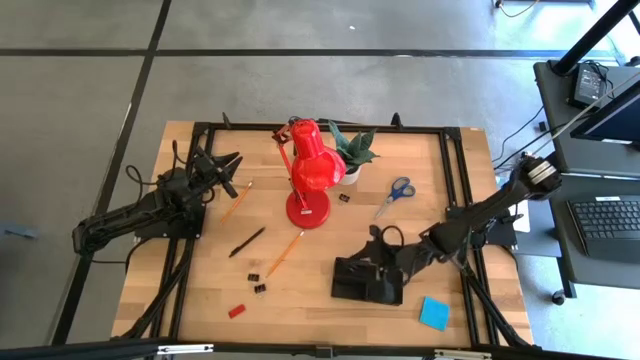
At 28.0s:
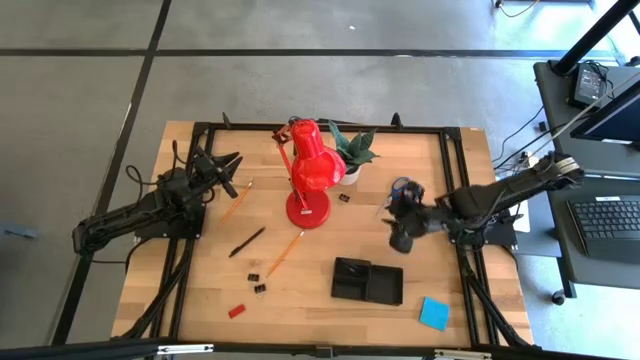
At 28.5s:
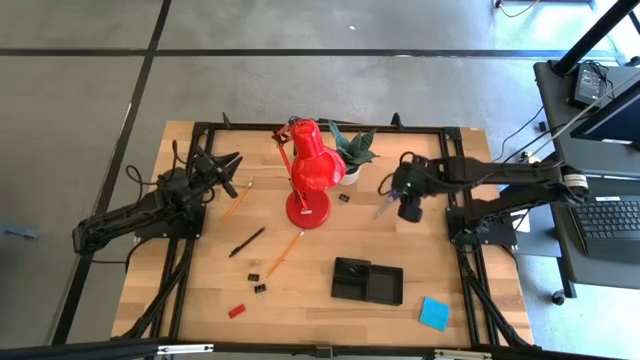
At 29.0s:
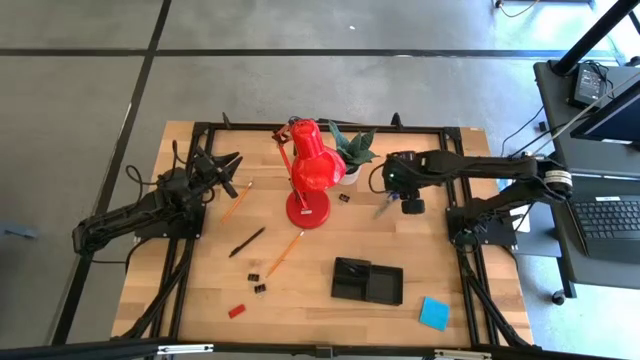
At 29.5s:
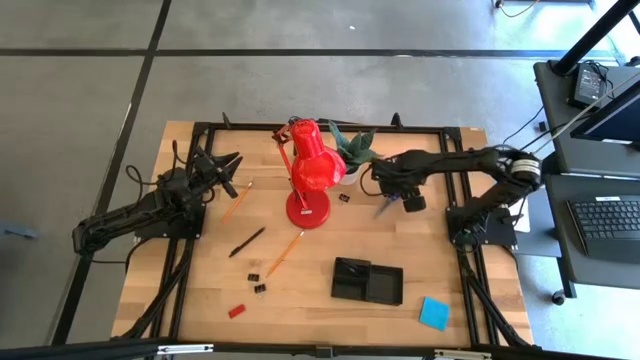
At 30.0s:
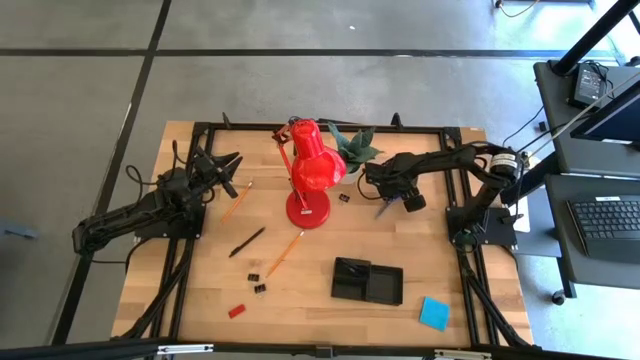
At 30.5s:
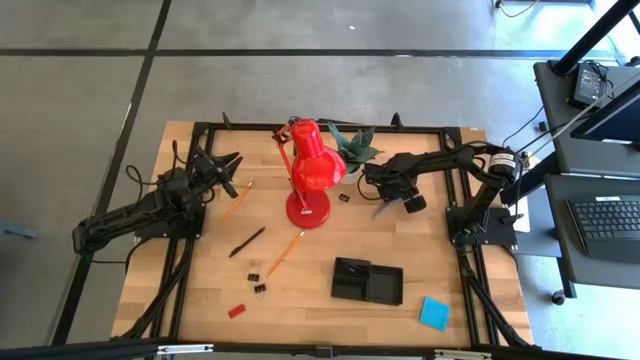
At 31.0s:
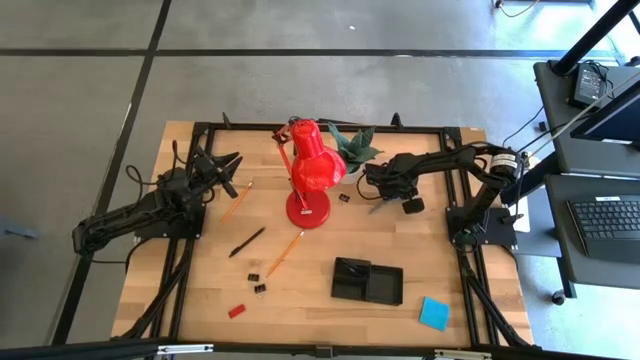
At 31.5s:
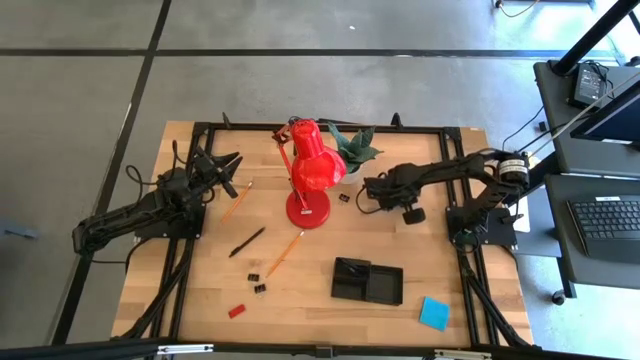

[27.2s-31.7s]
Task: Pick and place office supplies into organizer
Put the blue scissors into the black desk organizer

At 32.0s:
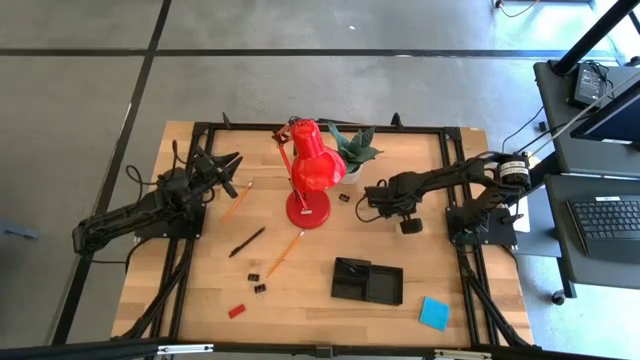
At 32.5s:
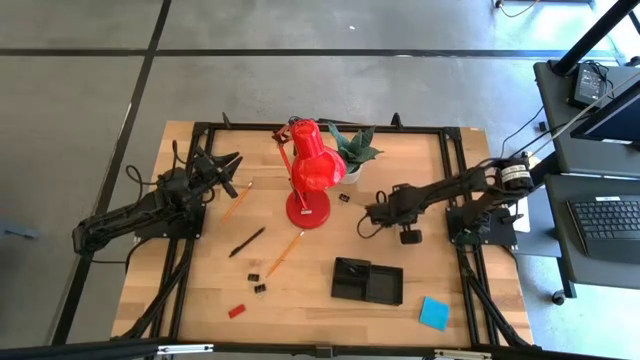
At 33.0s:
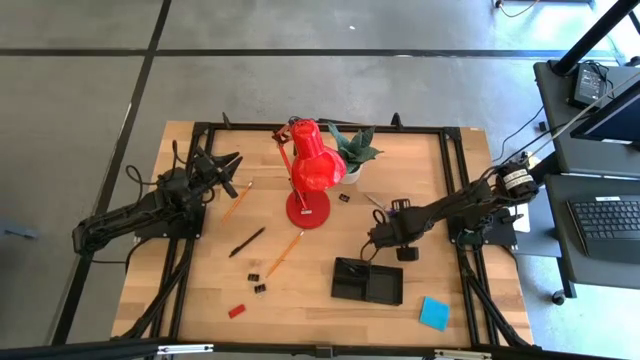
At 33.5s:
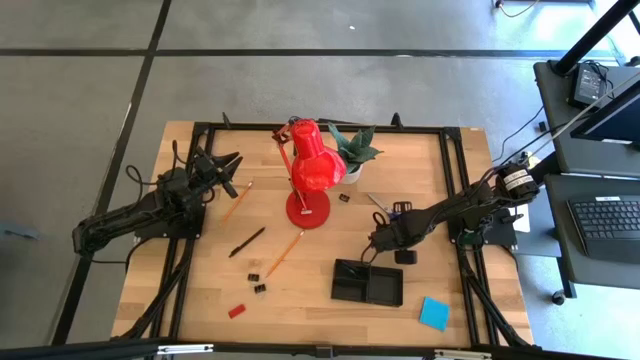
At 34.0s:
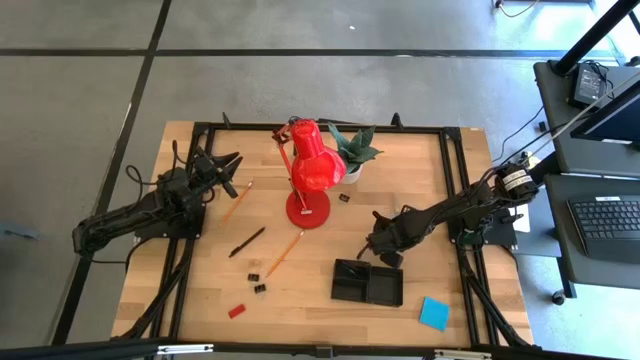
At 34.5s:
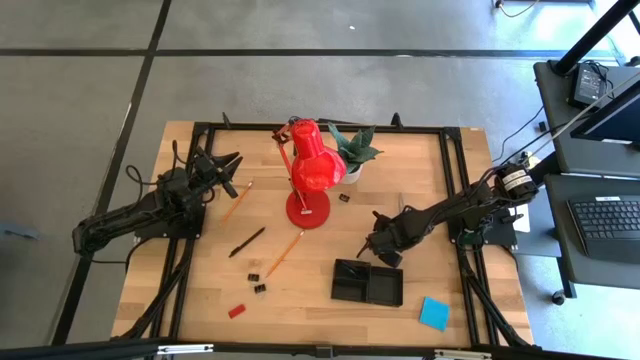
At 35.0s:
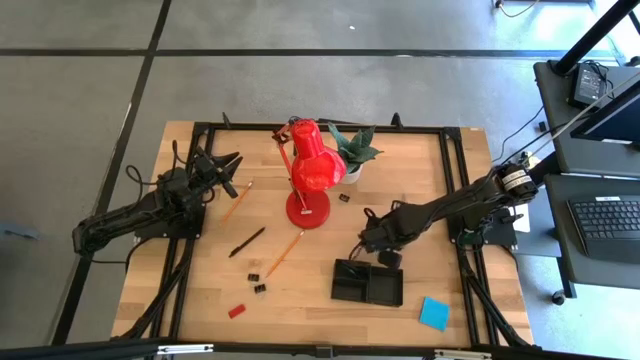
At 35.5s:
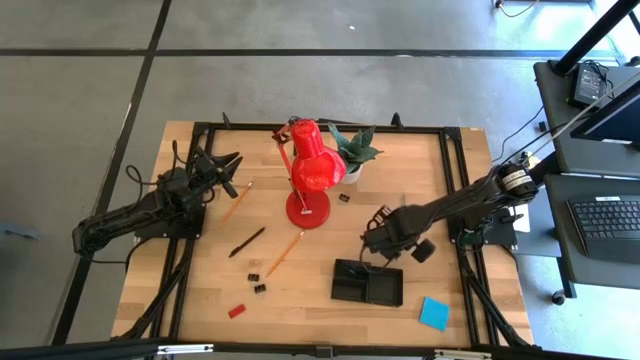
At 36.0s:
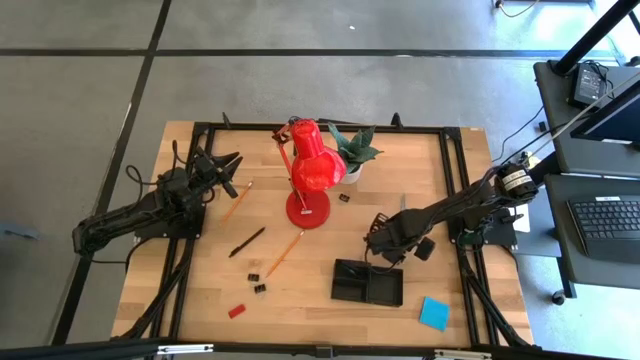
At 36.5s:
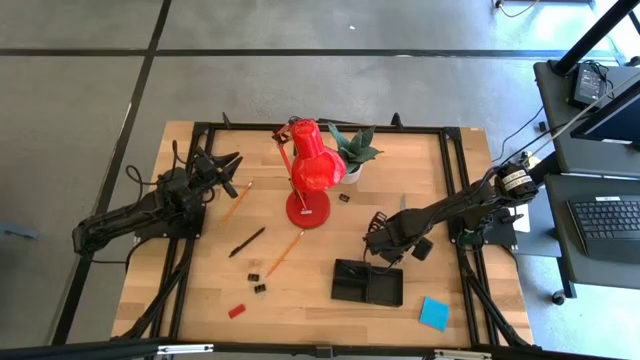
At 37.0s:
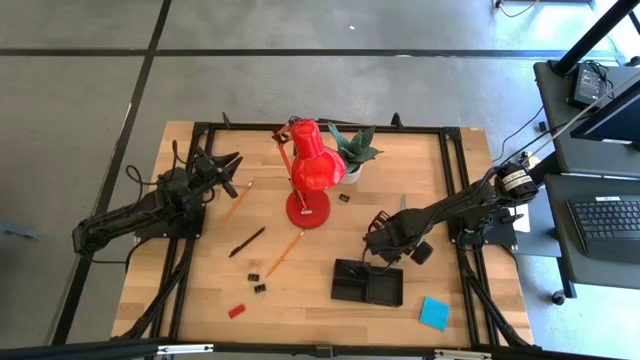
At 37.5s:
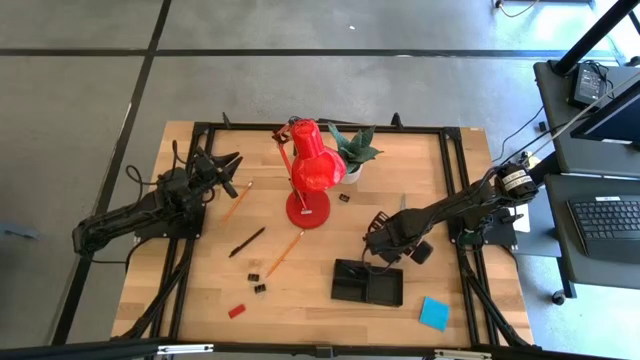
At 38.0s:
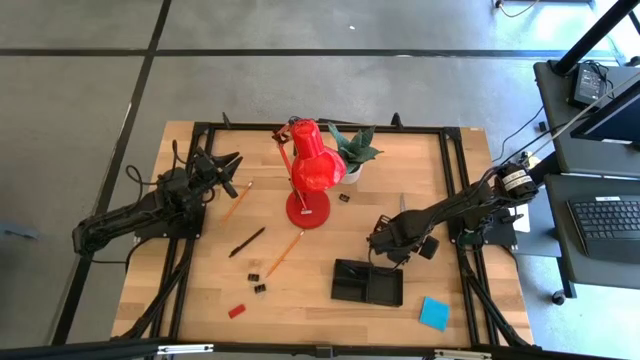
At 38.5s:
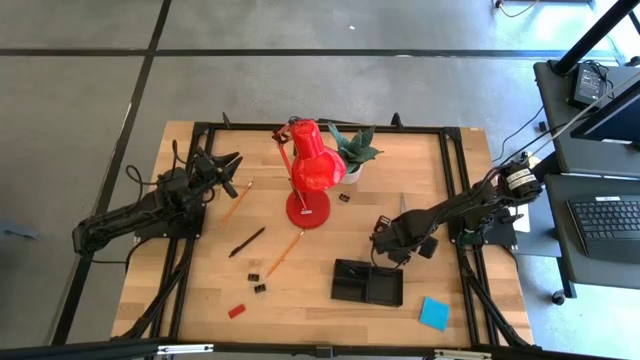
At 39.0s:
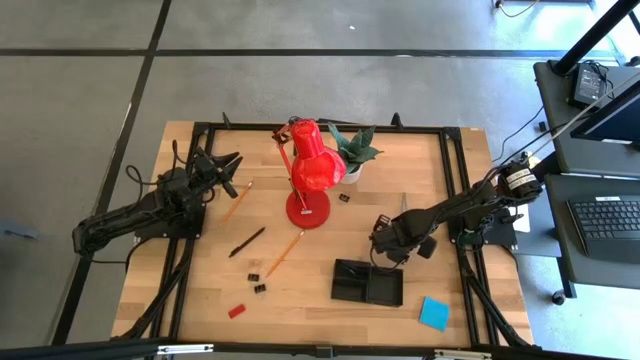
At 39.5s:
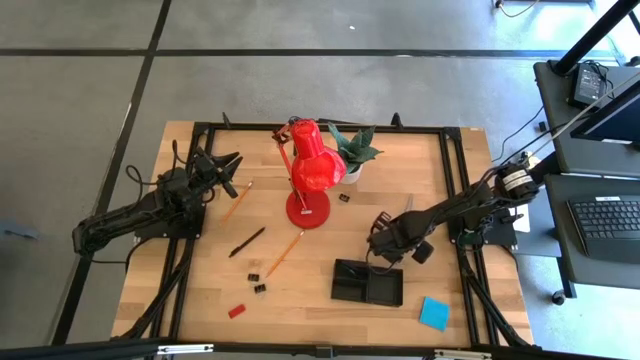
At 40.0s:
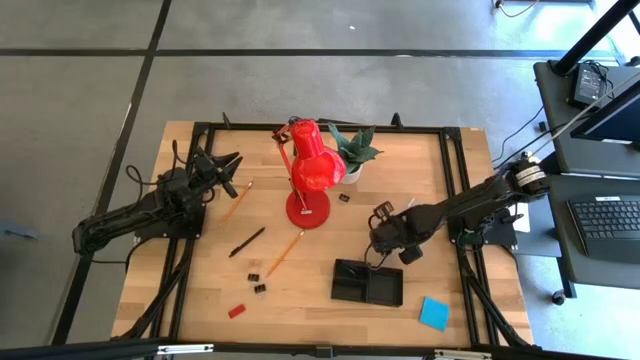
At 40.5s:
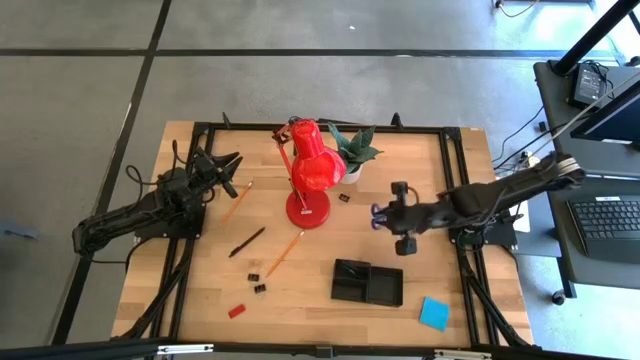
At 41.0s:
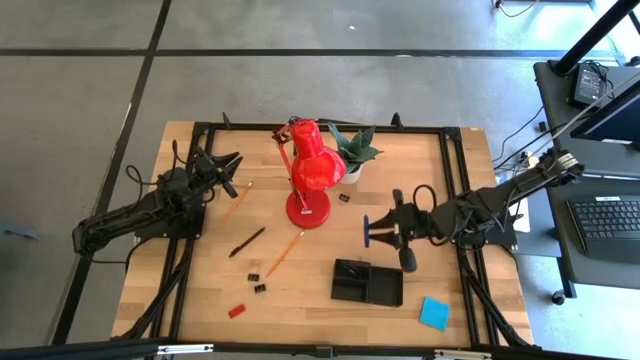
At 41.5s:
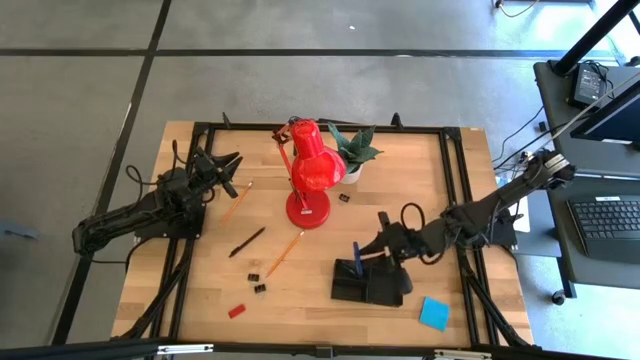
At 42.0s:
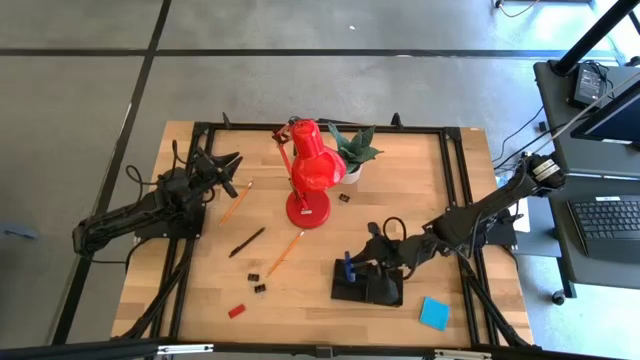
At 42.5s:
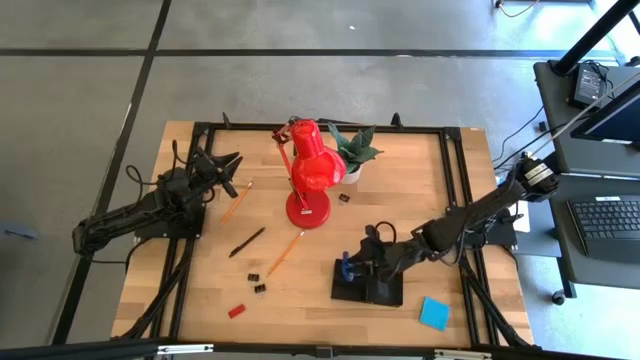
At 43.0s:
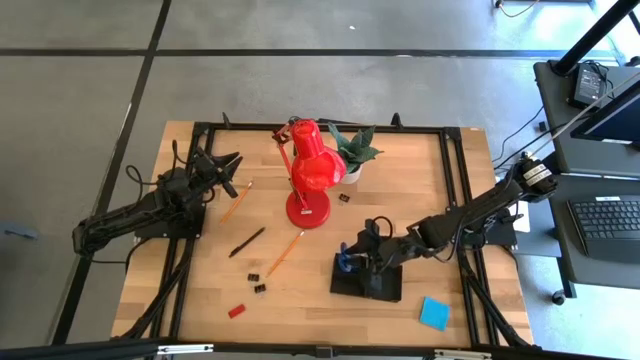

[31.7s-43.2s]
Put the blue scissors into the black desk organizer

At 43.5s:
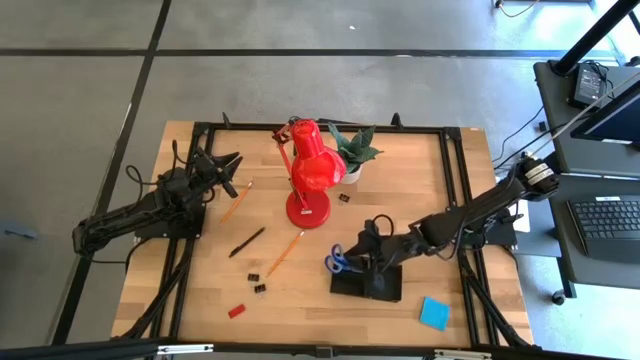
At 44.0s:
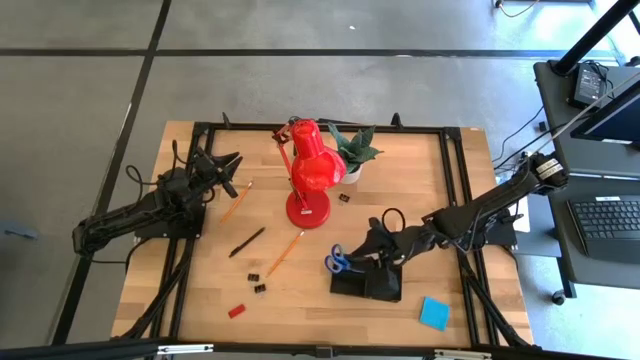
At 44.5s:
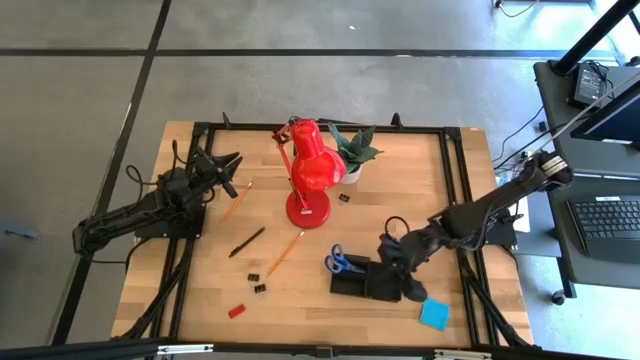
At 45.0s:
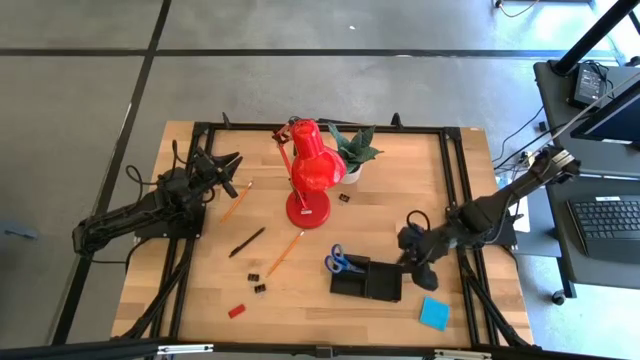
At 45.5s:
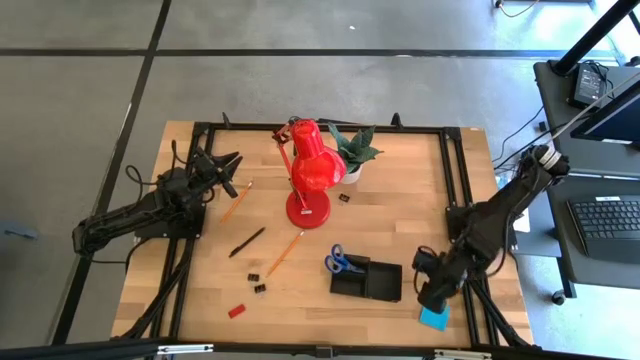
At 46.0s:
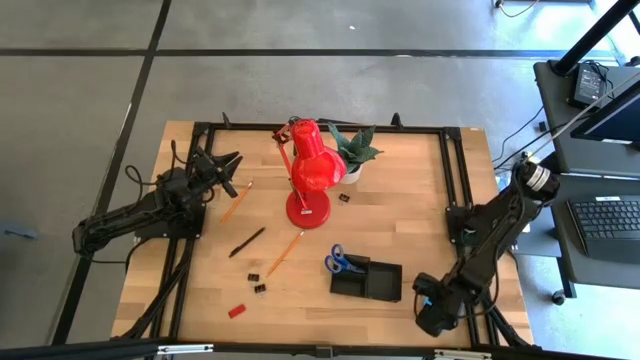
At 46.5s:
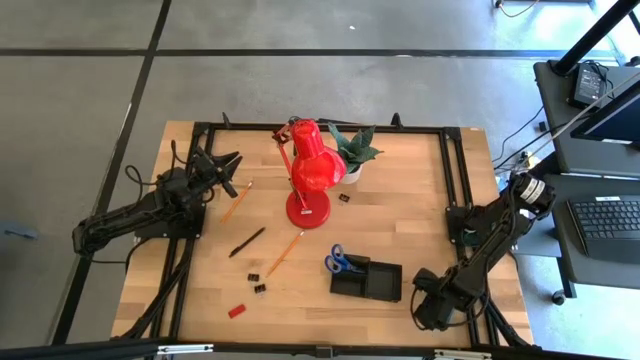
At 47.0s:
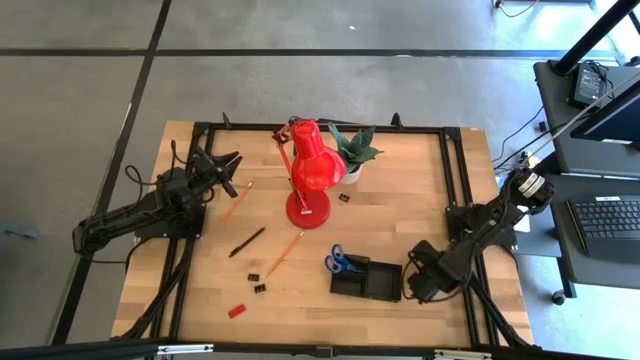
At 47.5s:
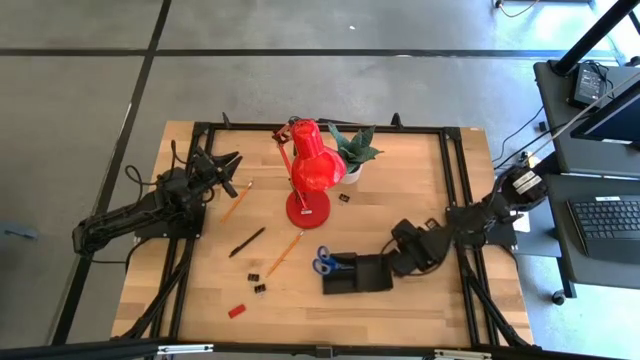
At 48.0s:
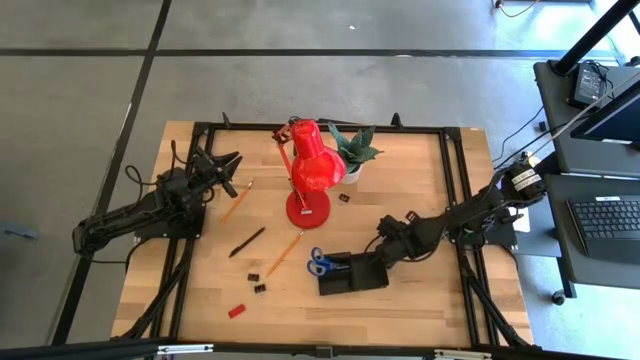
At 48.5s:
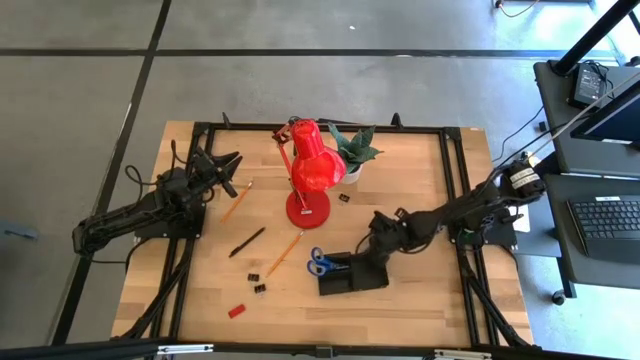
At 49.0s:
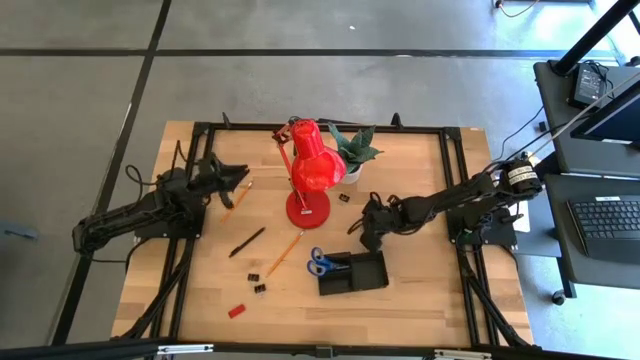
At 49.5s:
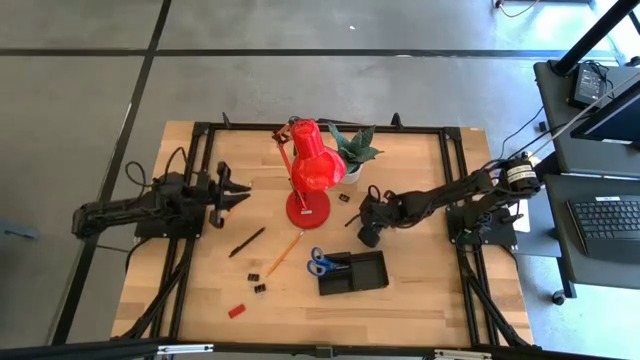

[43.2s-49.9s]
Move the blue sticky notes to the center of the table

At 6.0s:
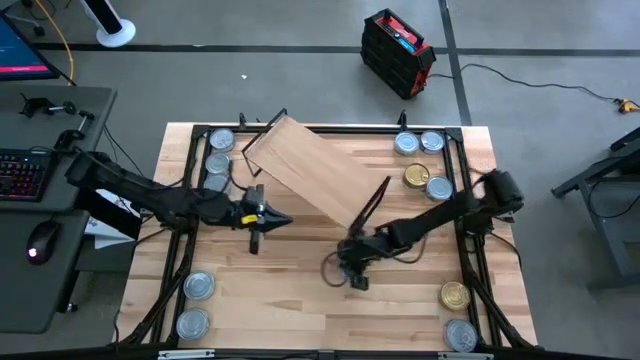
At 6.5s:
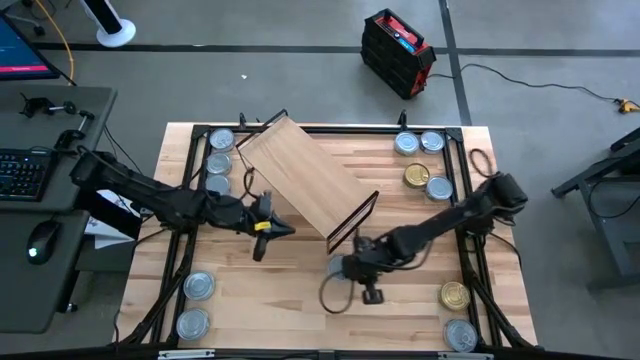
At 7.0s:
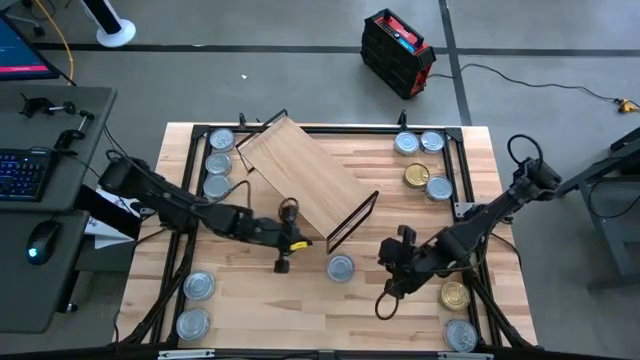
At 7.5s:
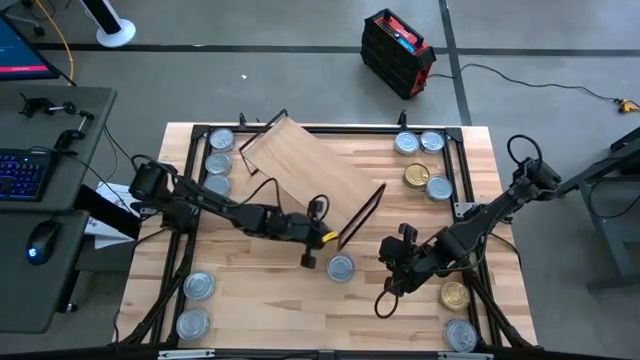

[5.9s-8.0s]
Task: Stack canned seafood by type on shelf
Adjust the shelf on the table
